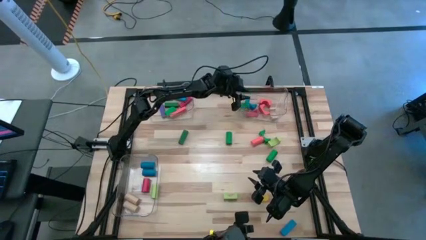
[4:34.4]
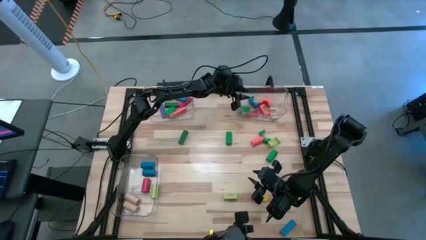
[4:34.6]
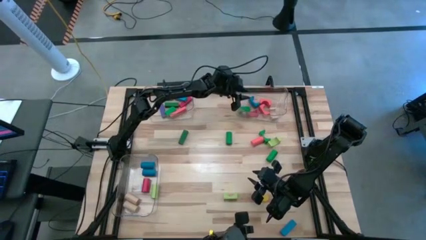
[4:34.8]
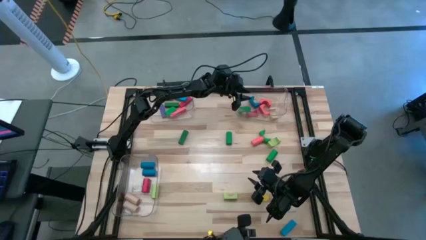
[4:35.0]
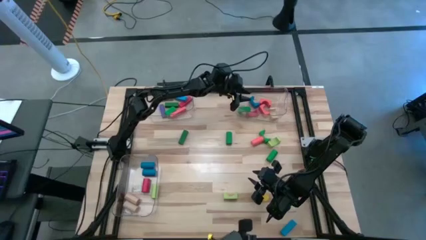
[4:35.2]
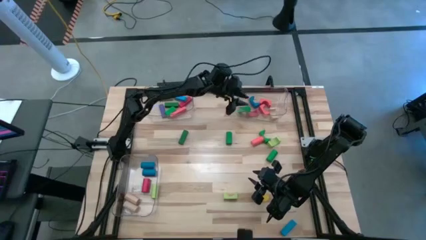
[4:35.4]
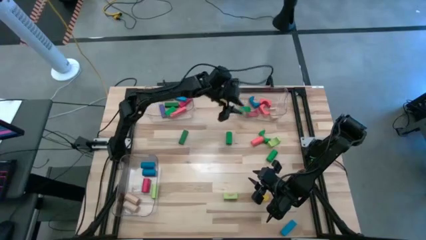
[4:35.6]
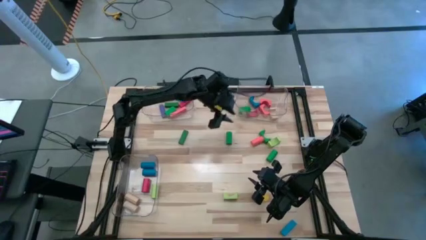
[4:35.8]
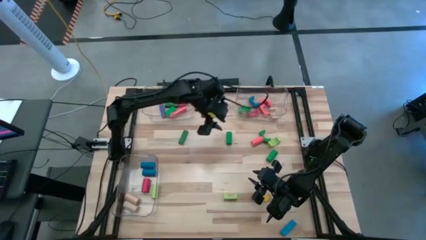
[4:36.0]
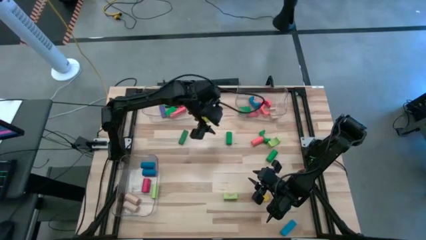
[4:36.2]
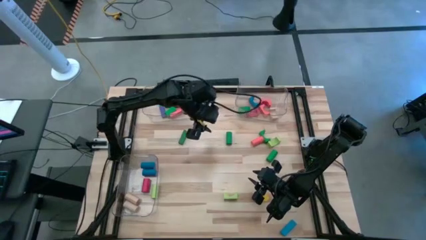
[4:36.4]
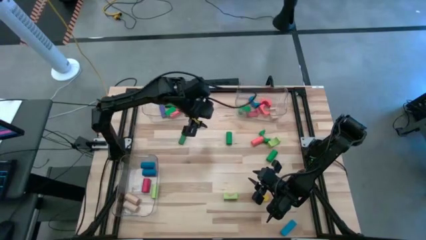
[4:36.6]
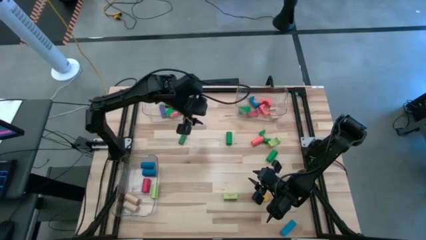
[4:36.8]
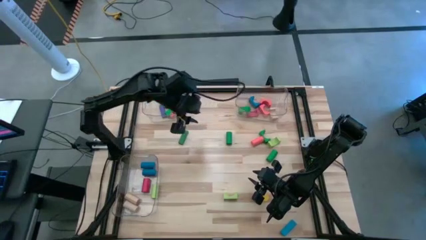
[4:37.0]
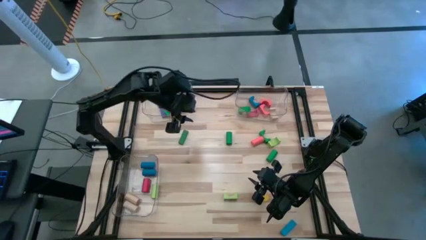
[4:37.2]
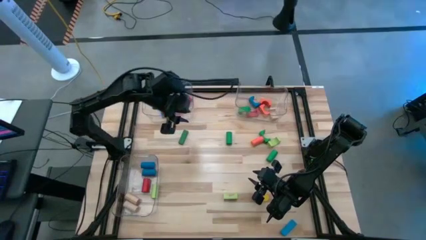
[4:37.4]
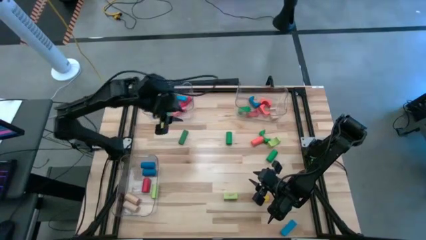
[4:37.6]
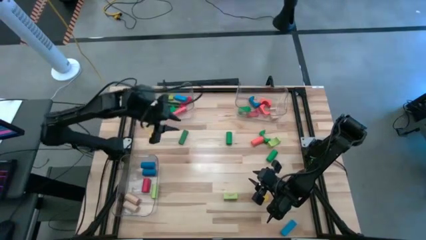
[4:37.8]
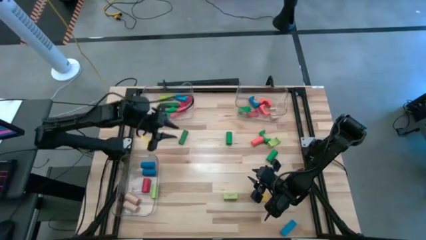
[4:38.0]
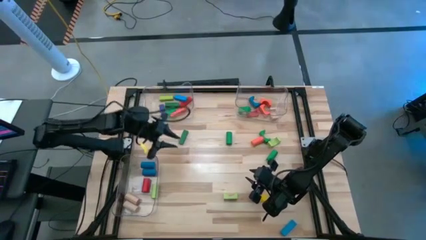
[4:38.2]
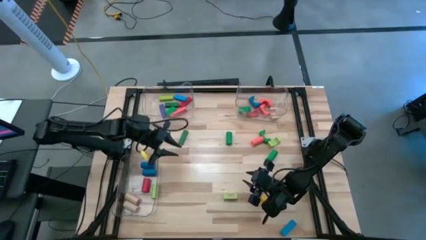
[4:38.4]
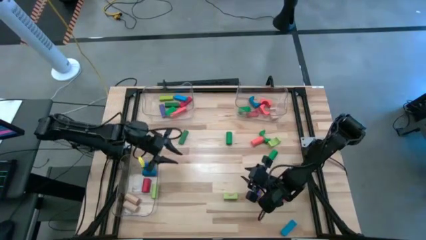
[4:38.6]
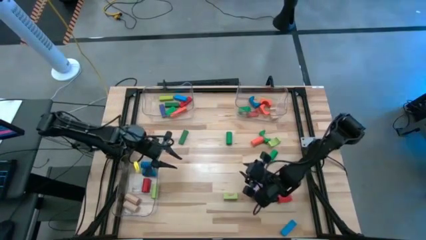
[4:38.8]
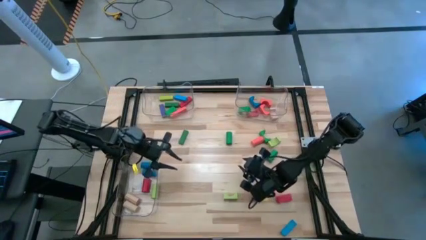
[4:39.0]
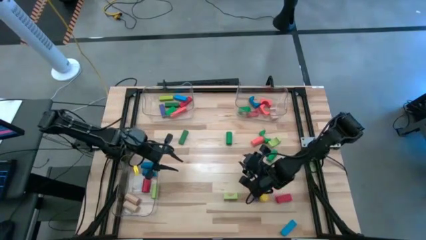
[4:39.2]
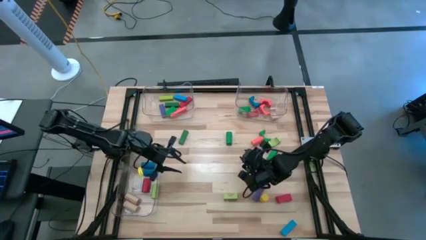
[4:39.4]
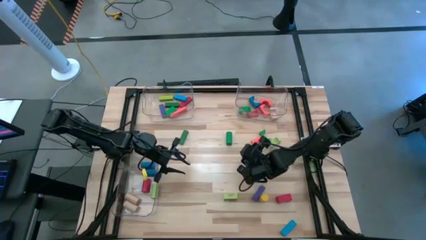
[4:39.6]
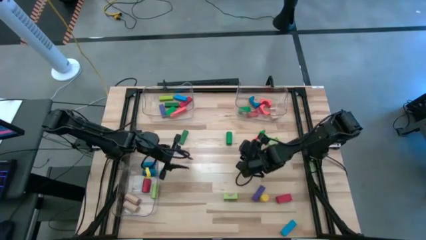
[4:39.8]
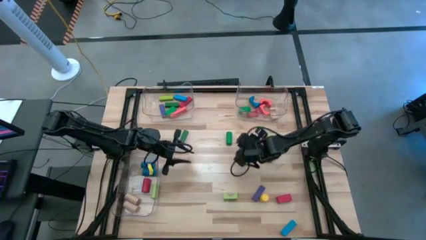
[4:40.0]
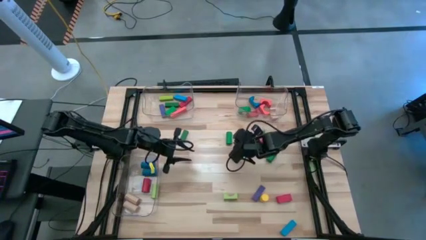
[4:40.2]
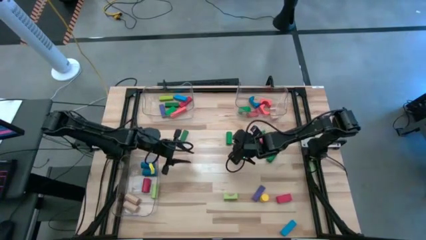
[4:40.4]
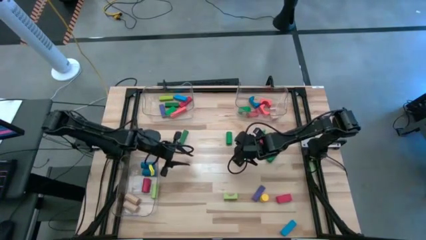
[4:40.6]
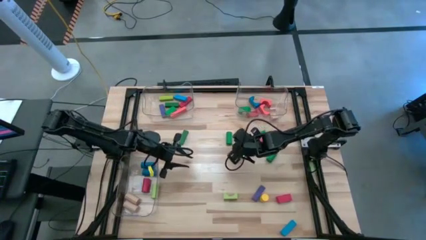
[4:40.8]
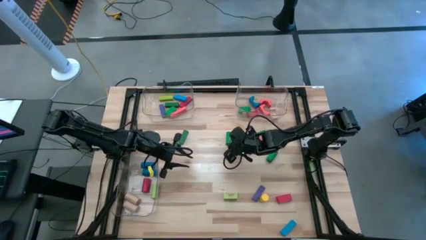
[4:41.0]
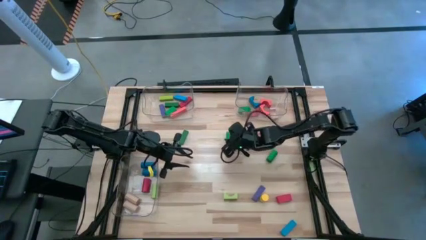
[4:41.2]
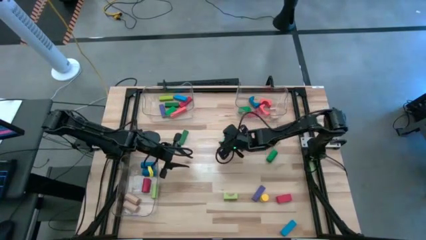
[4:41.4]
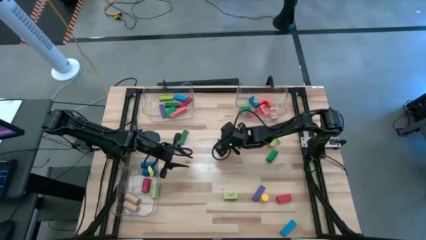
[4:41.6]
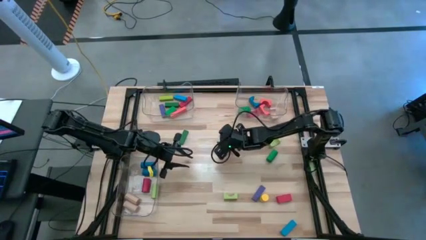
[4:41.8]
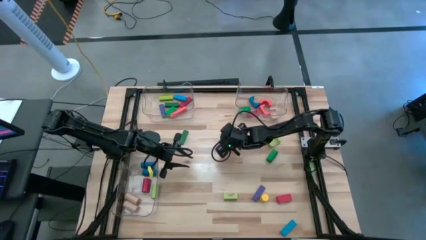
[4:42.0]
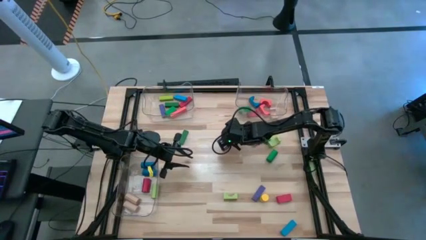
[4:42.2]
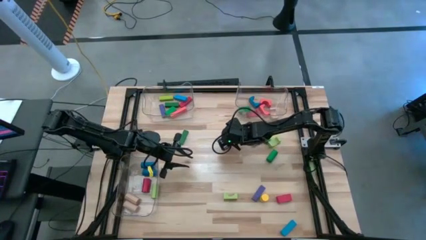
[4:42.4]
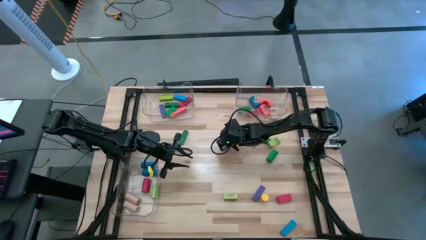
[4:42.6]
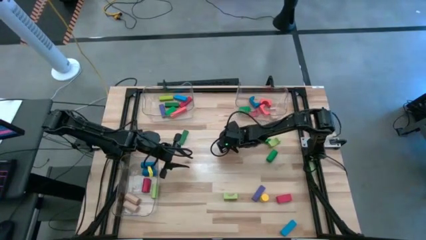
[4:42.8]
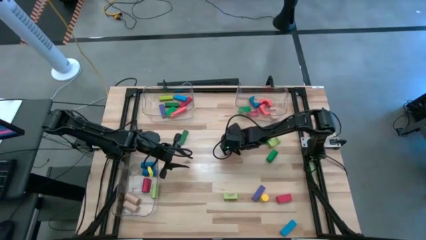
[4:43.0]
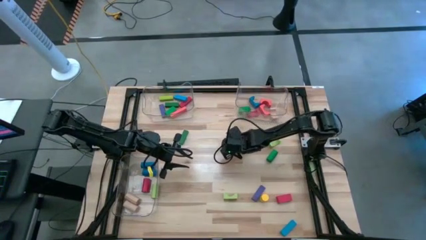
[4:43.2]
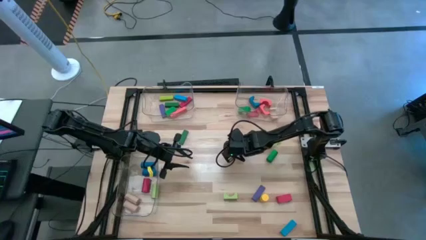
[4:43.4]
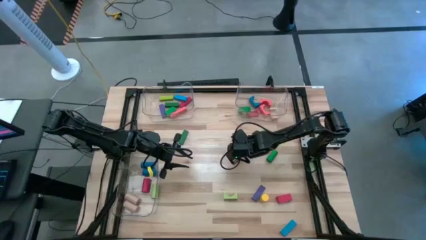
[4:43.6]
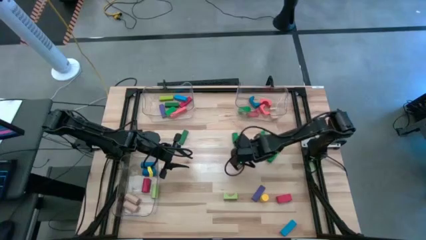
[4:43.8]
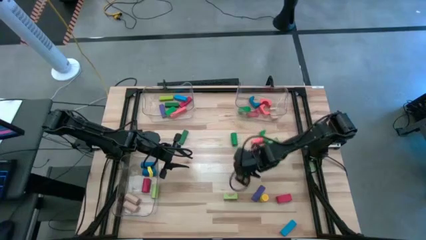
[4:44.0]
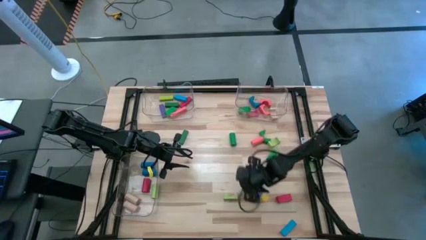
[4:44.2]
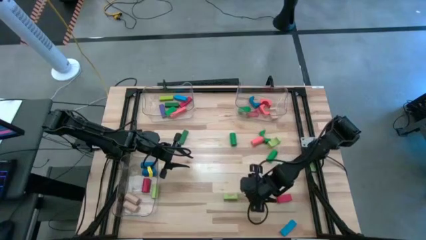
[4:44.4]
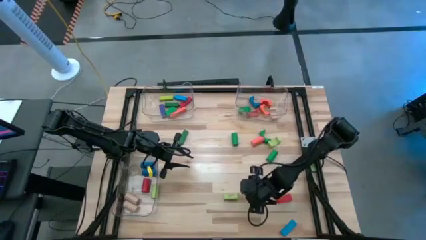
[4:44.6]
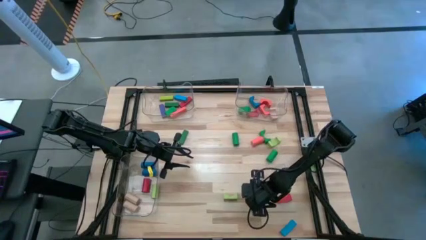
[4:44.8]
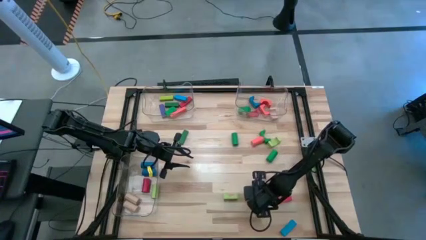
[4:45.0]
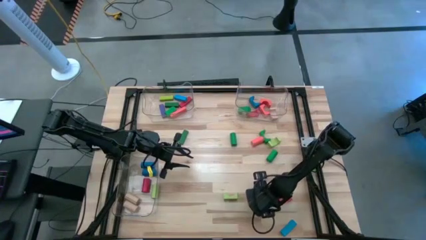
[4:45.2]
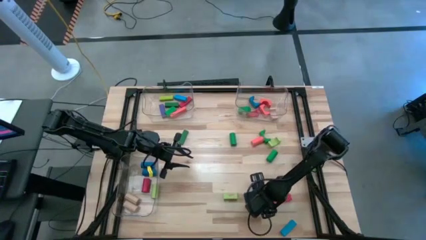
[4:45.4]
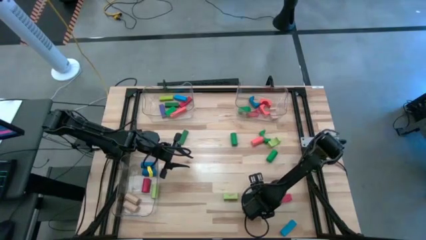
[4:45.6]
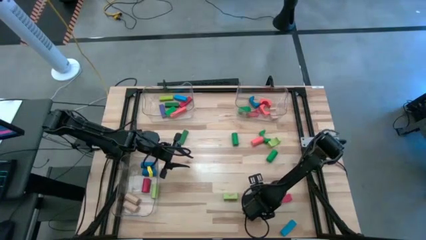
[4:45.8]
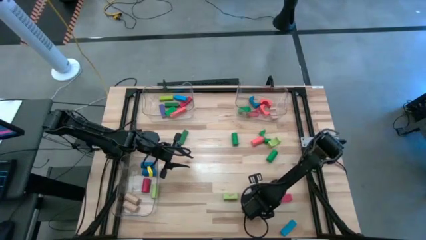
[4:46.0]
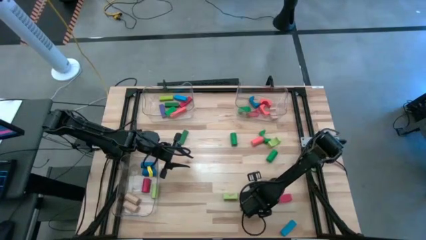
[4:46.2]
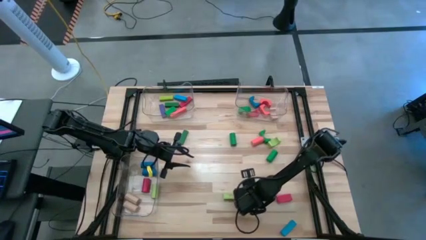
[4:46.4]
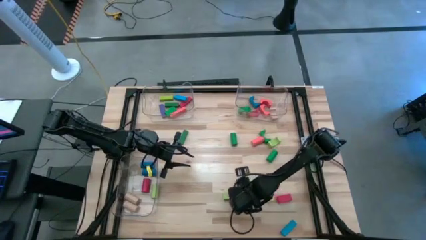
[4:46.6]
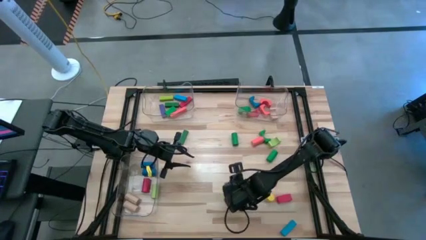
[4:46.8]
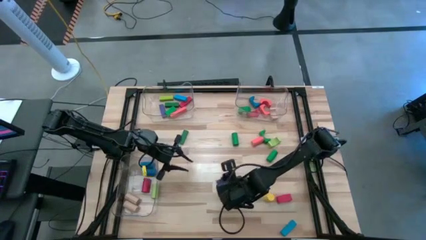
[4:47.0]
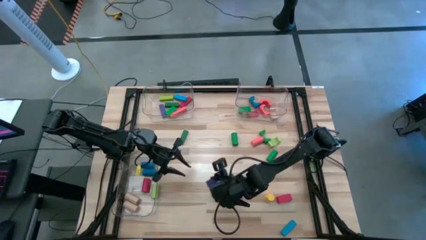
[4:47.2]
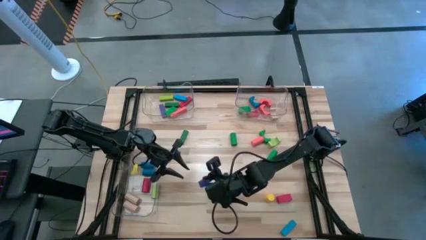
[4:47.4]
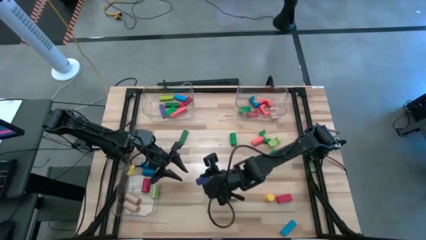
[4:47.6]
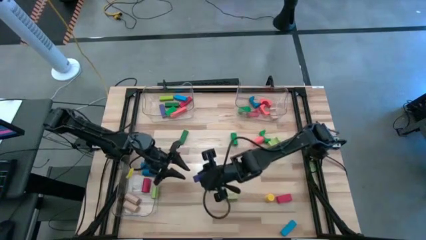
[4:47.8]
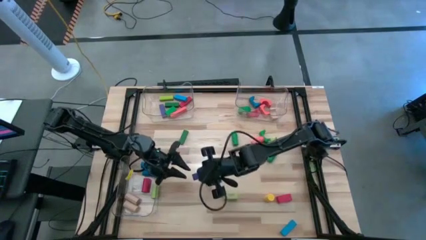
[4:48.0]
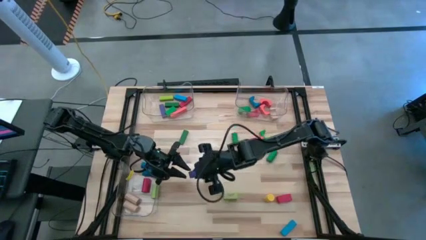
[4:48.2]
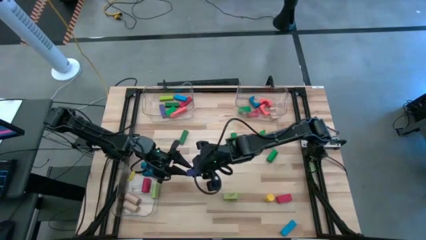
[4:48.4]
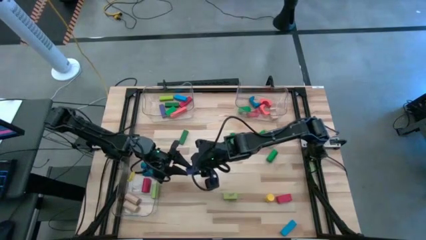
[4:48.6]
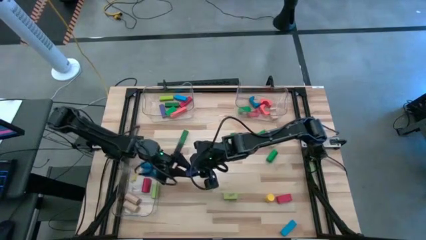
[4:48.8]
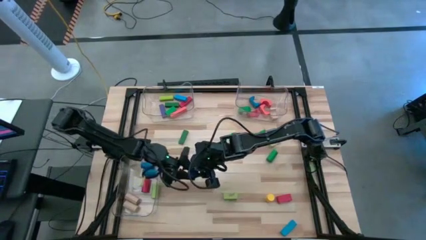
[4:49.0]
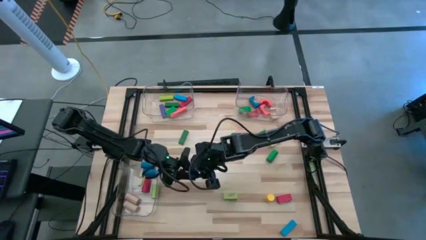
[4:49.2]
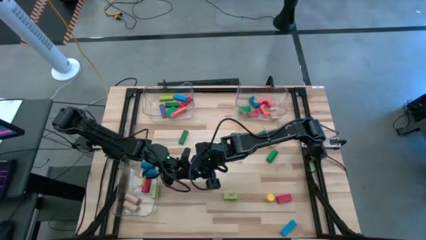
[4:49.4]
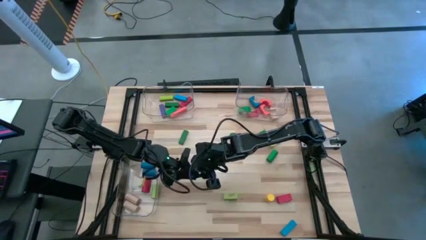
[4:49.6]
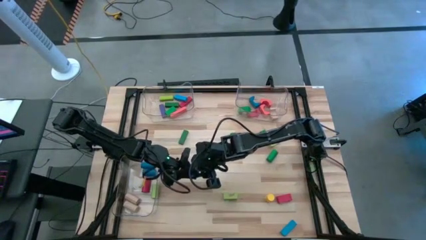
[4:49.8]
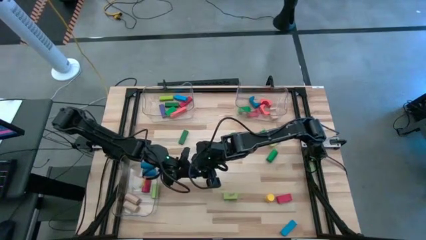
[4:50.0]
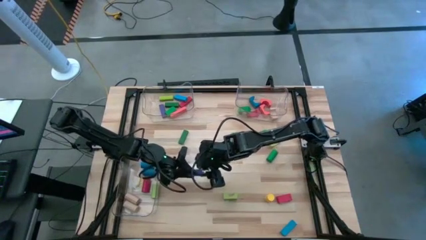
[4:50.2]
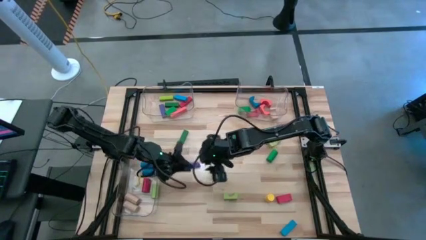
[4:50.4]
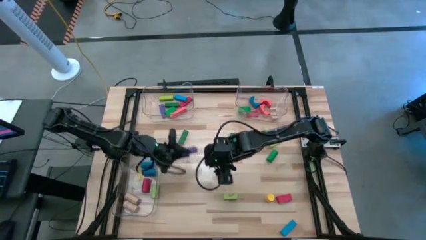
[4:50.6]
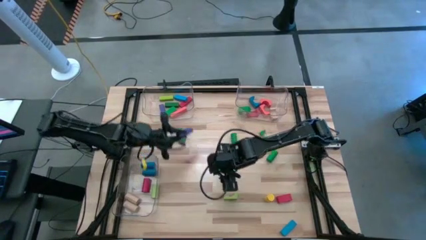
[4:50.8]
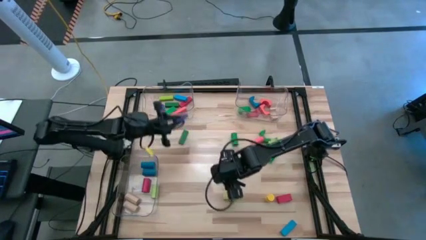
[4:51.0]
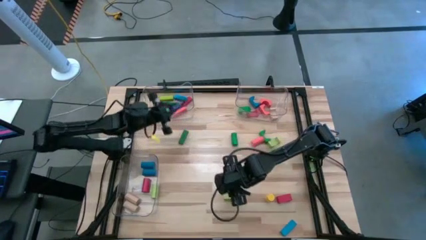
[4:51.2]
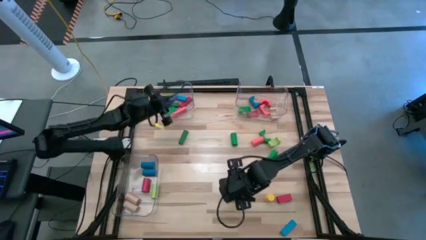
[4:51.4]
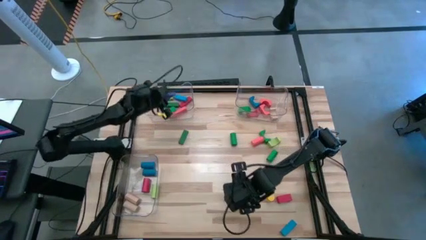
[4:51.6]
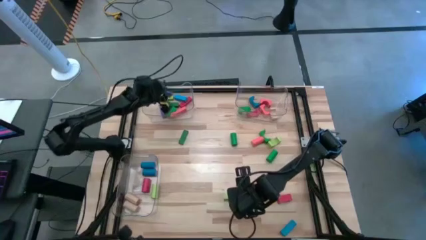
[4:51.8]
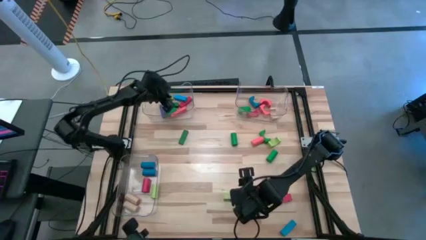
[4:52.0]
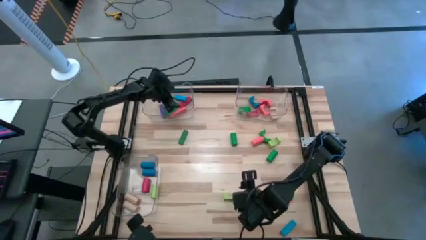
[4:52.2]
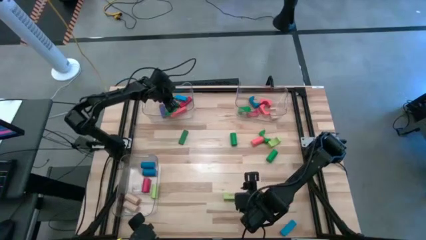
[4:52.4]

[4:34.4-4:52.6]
Task: Sort blocks by size
Put the dark blue rectangular block into the top left transparent bin
